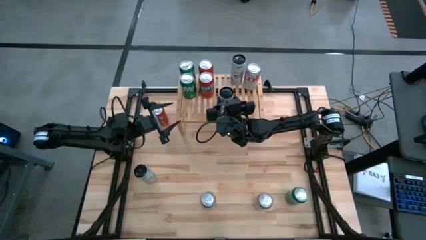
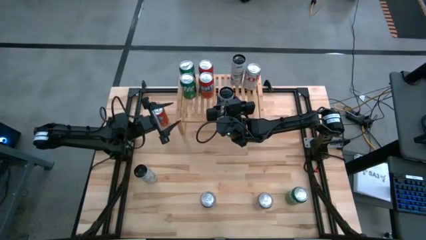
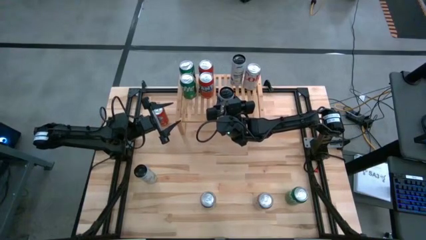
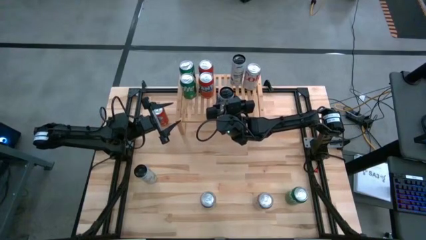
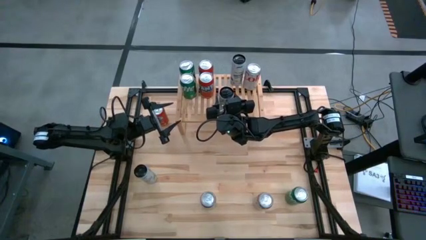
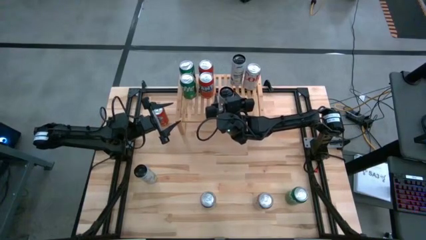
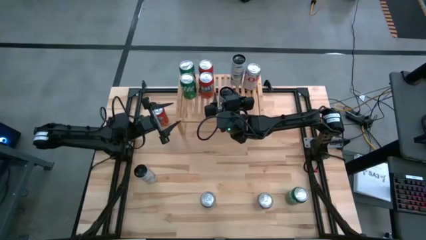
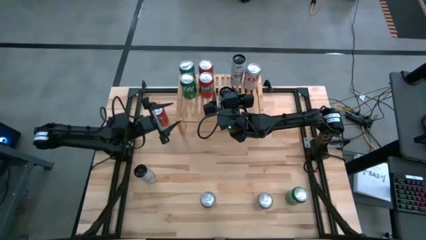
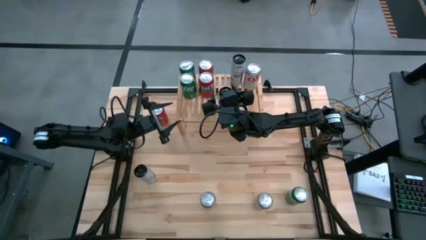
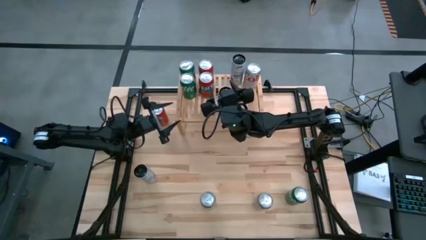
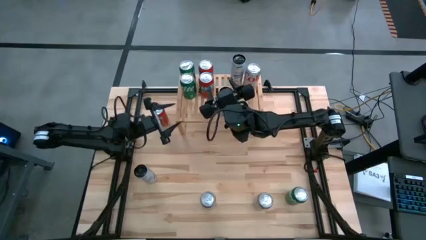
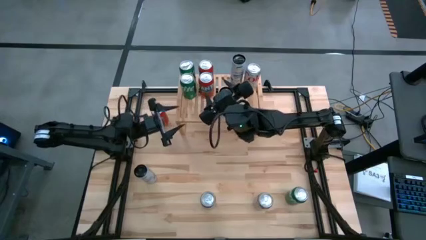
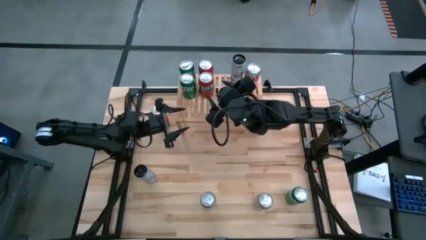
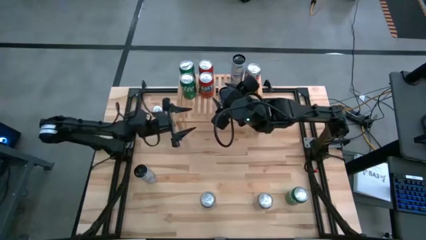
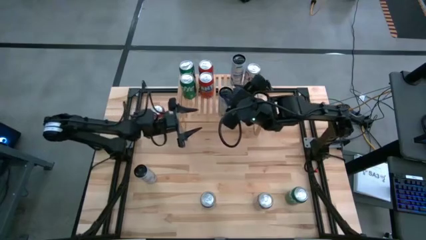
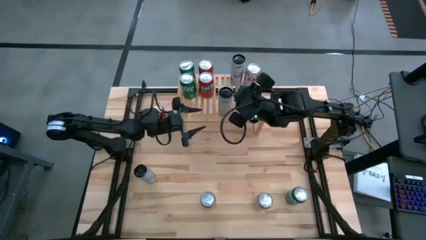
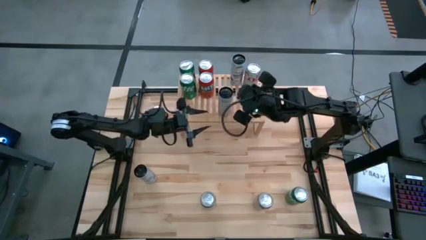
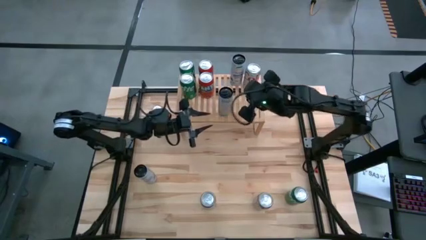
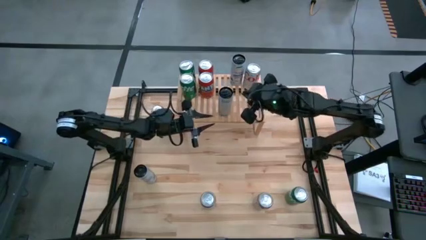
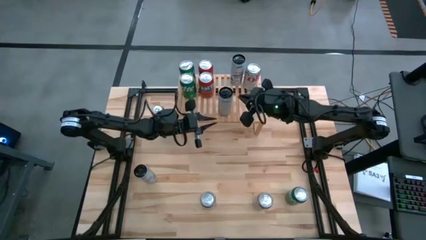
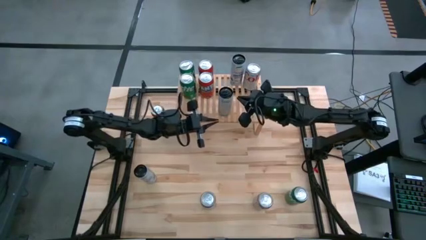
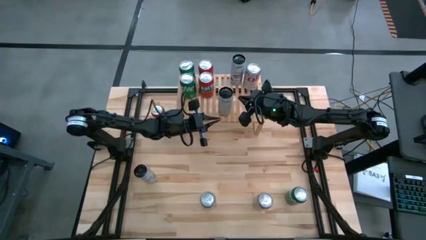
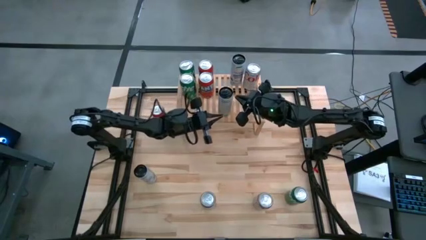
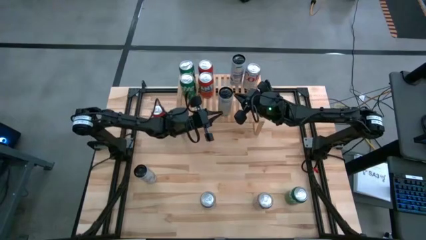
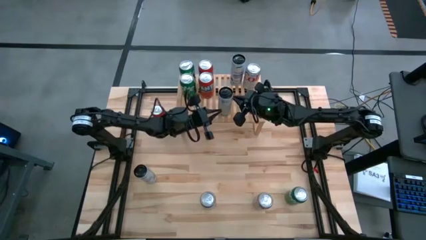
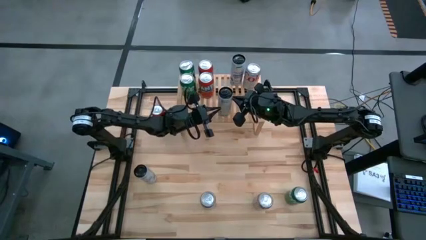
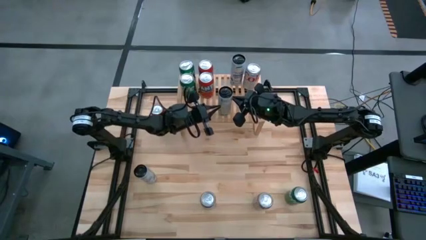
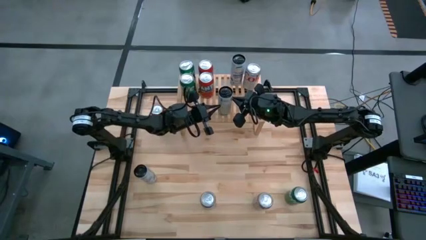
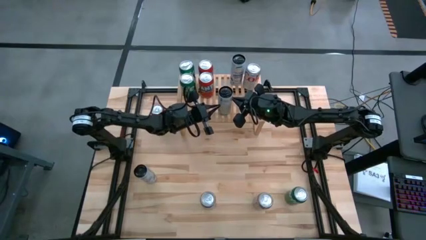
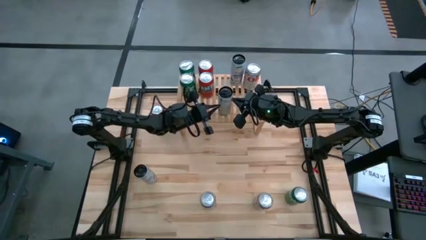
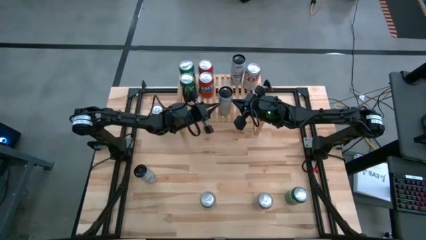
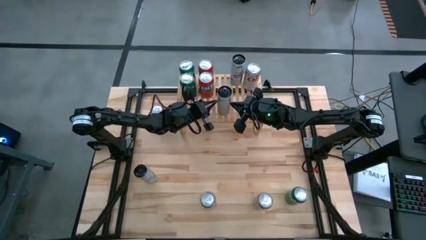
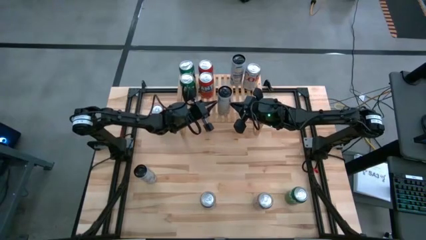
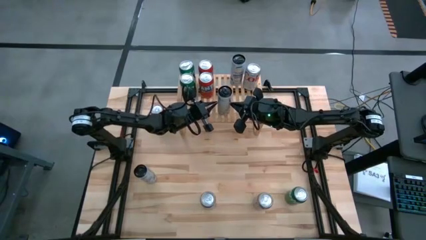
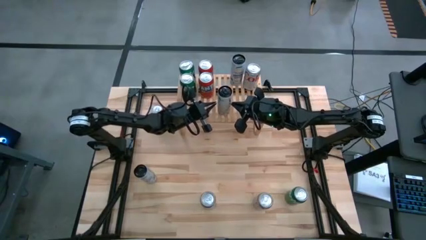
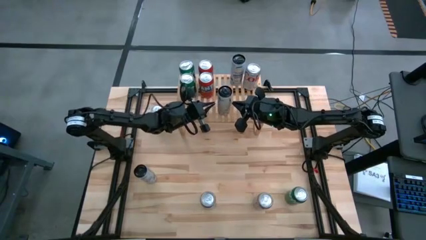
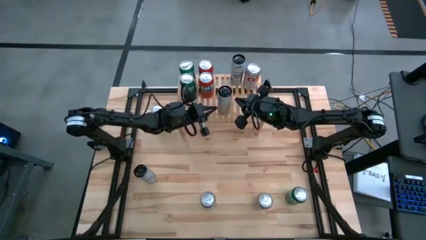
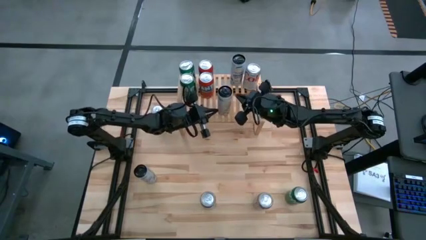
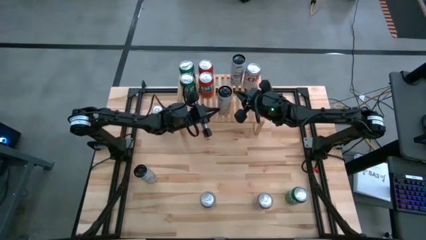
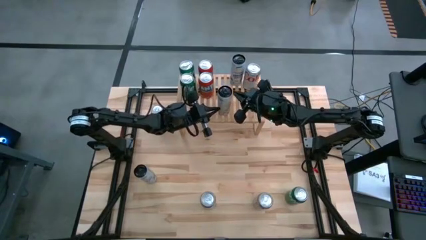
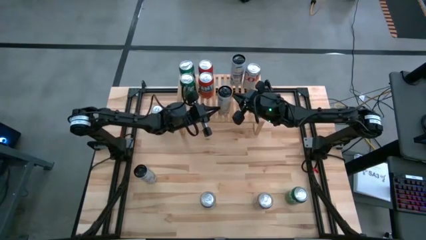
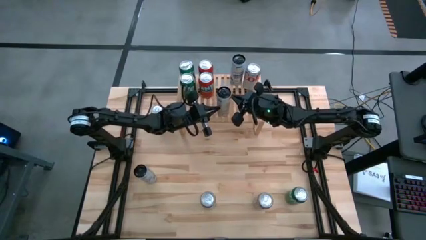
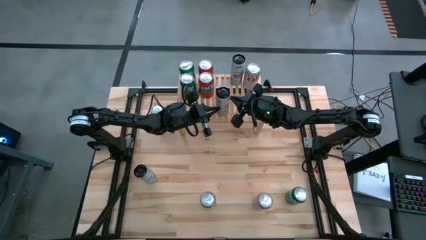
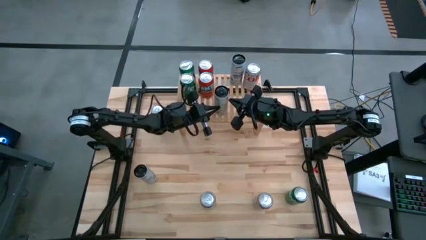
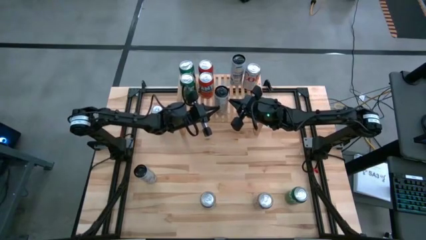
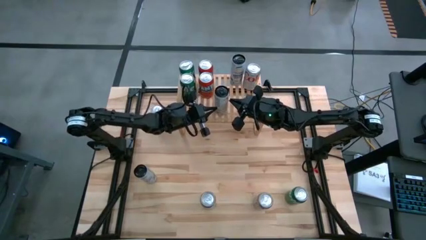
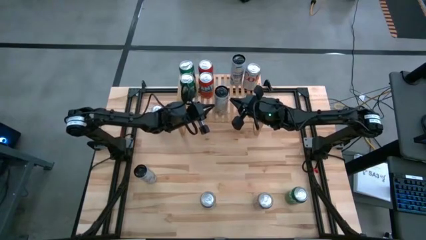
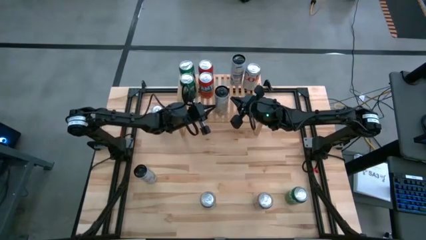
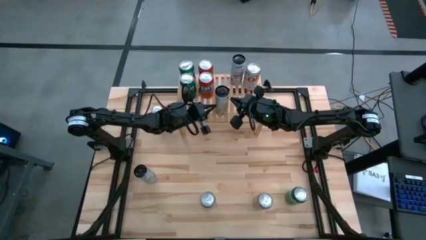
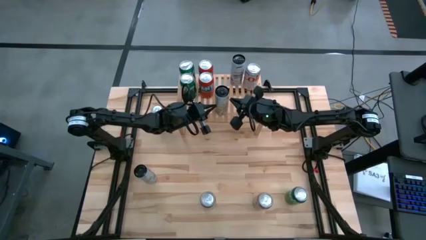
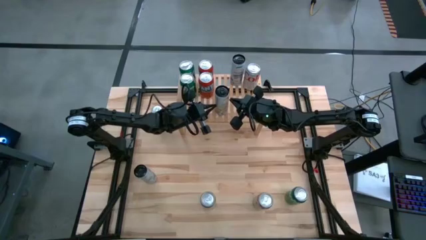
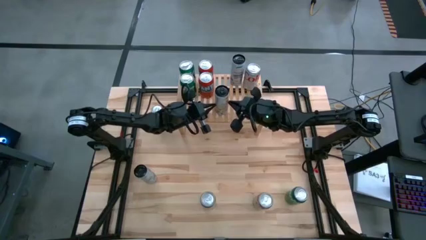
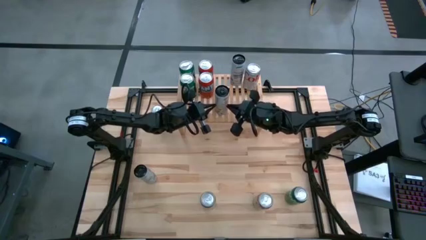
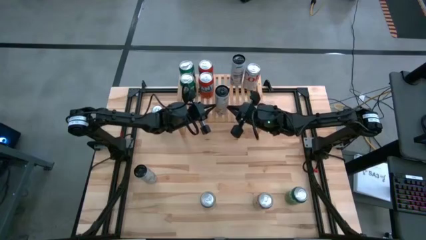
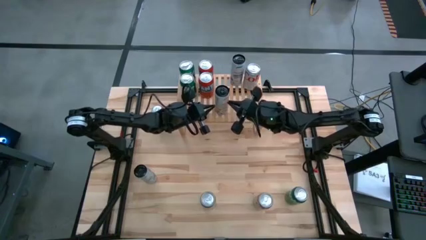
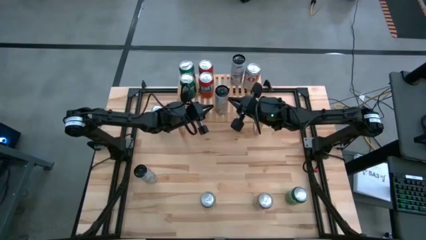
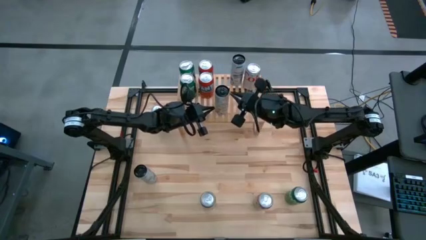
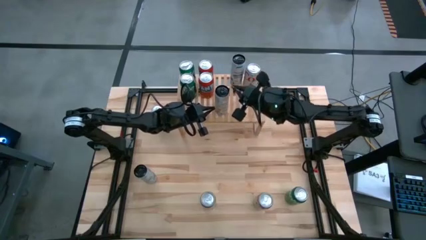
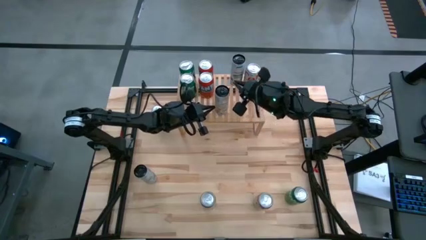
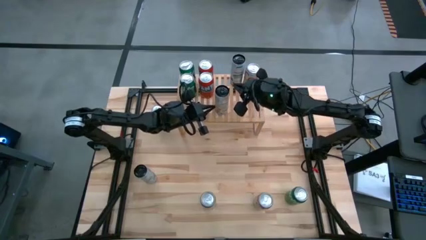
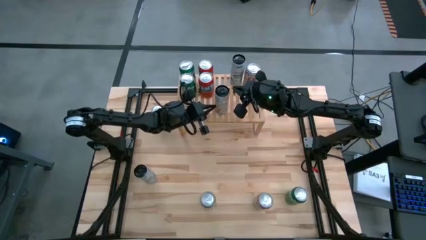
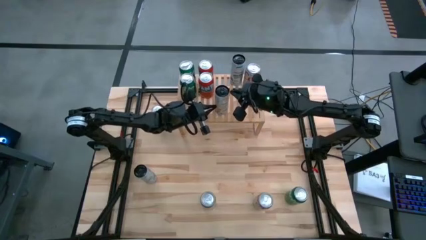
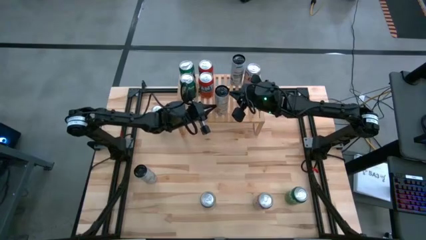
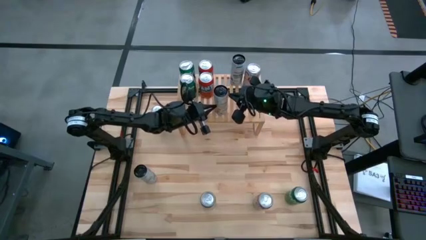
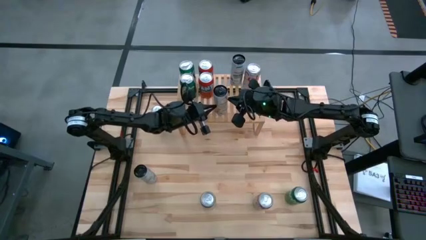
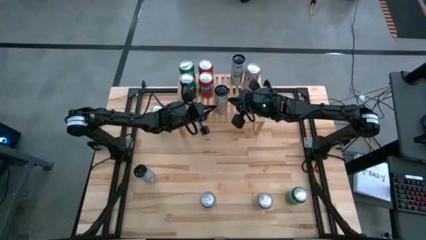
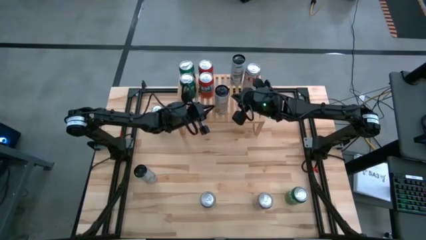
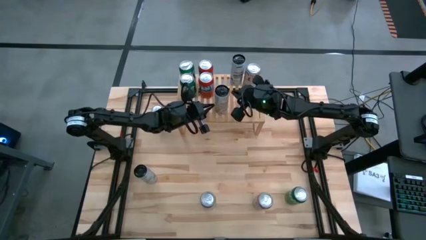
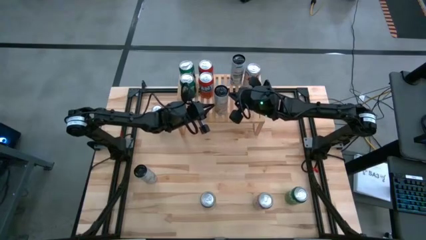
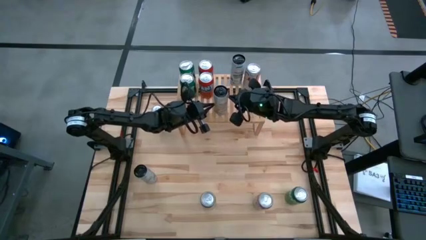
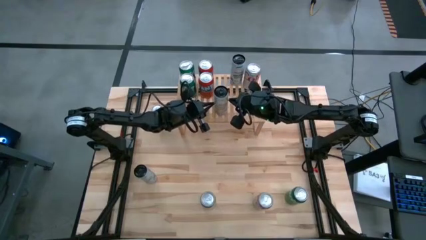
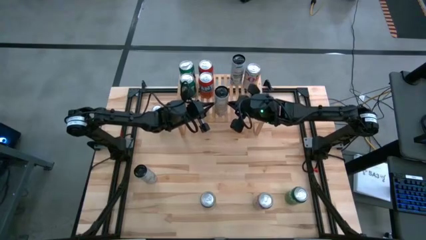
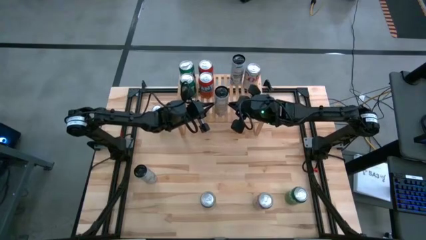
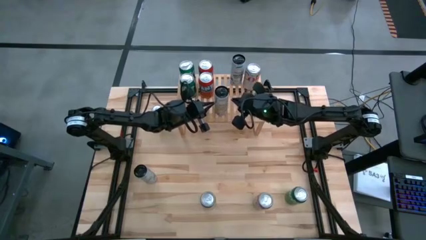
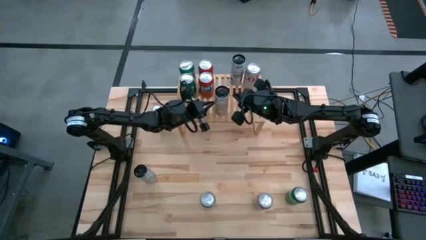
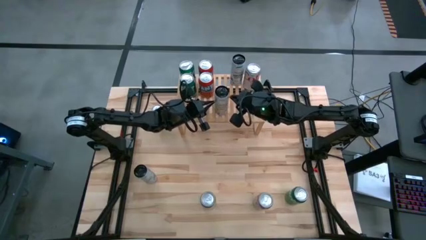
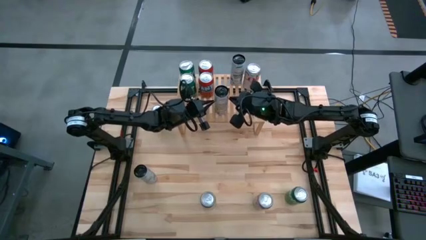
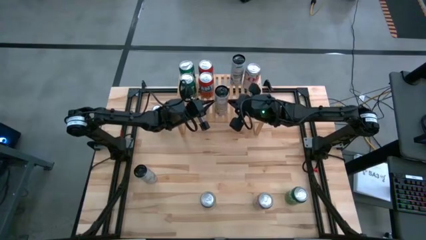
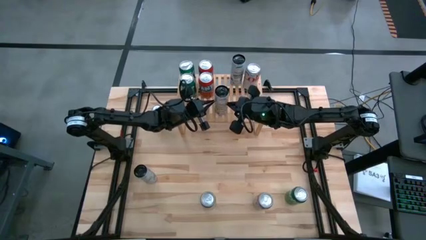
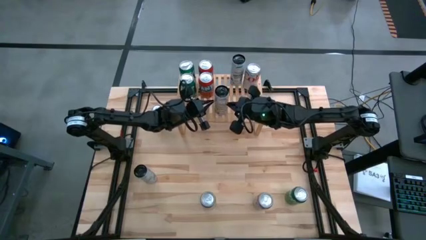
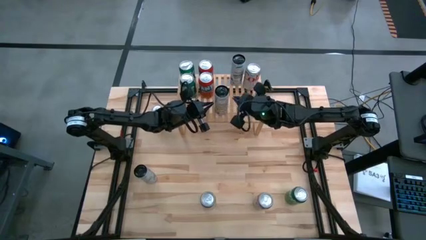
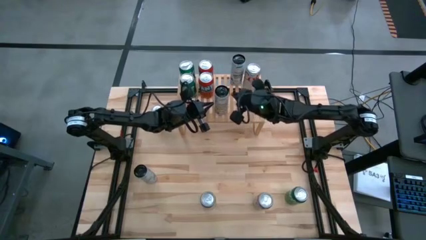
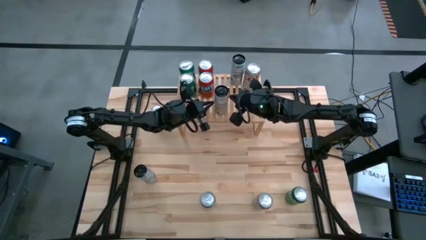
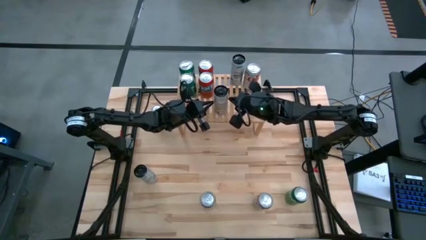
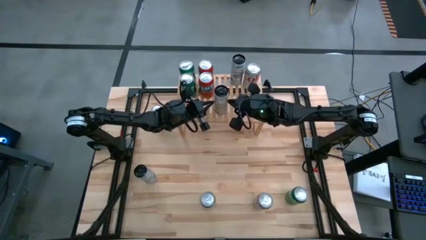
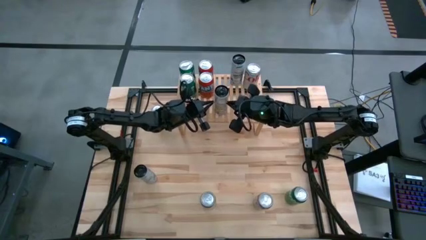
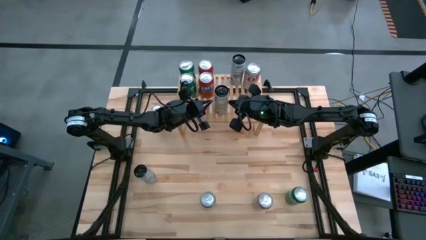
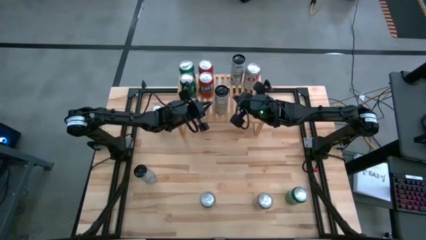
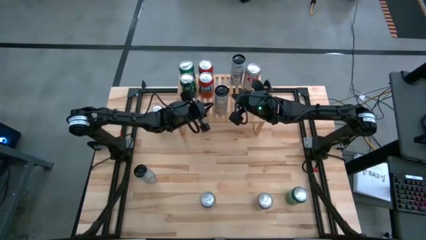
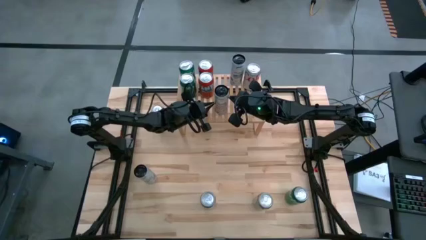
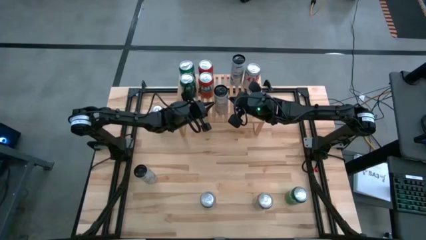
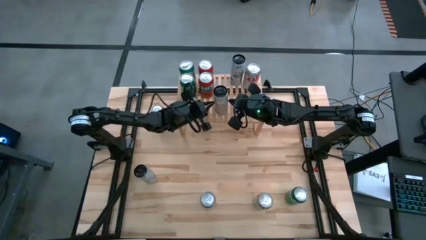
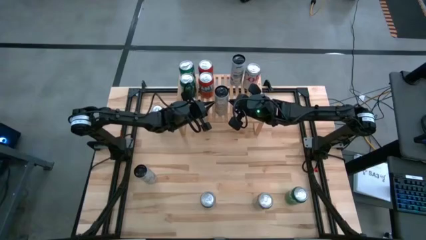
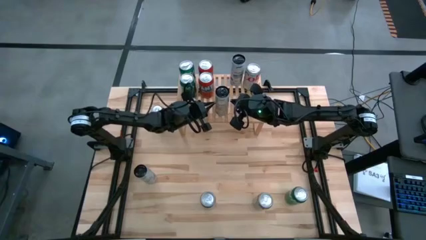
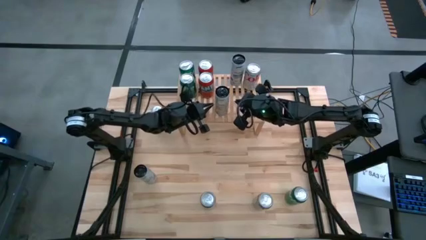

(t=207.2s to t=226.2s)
Task: Place canned beverage on shelf
Put the white yellow soda can on the shelf
